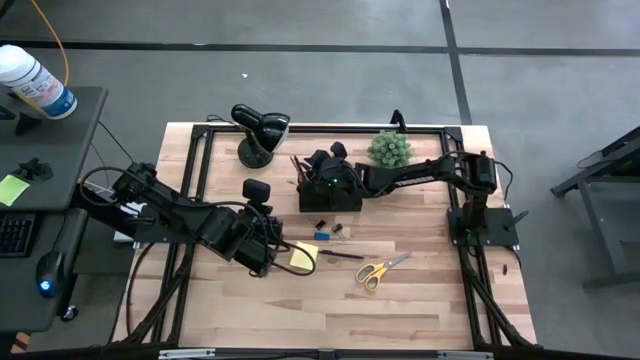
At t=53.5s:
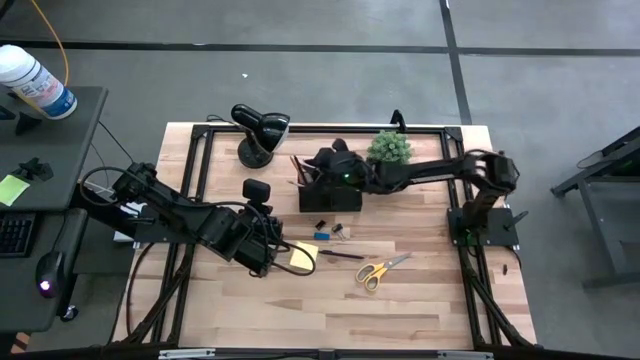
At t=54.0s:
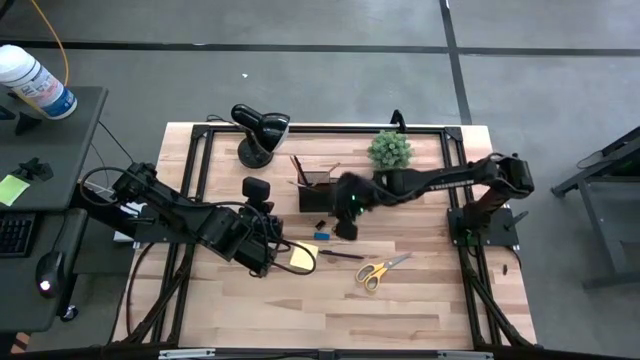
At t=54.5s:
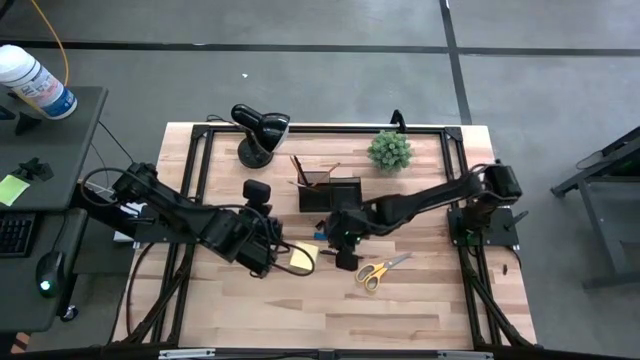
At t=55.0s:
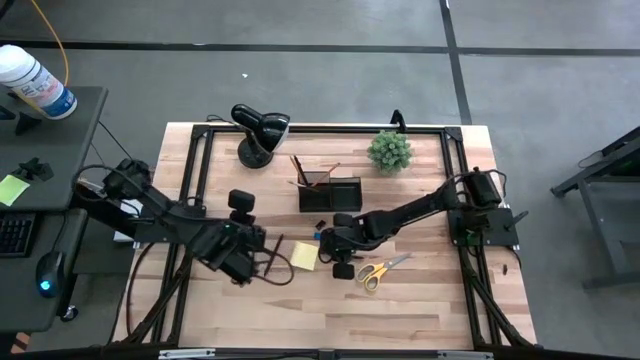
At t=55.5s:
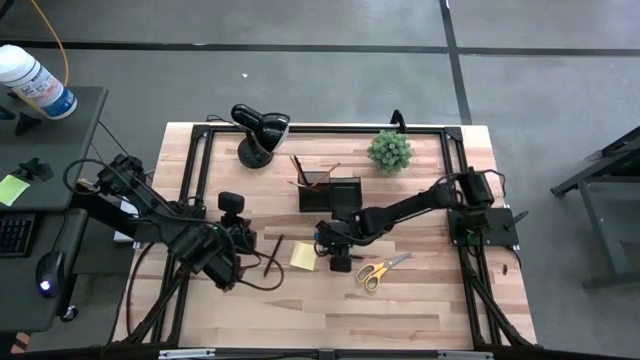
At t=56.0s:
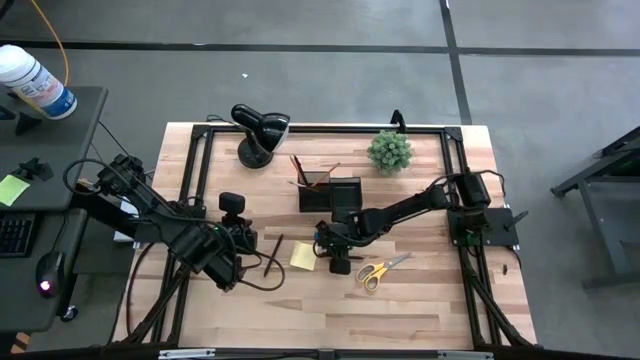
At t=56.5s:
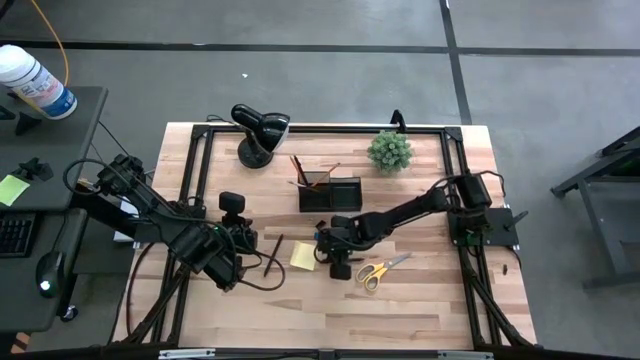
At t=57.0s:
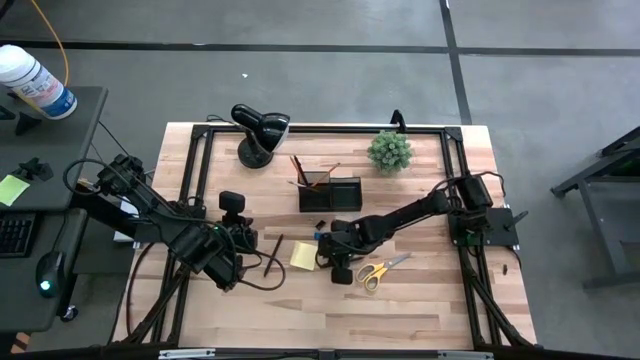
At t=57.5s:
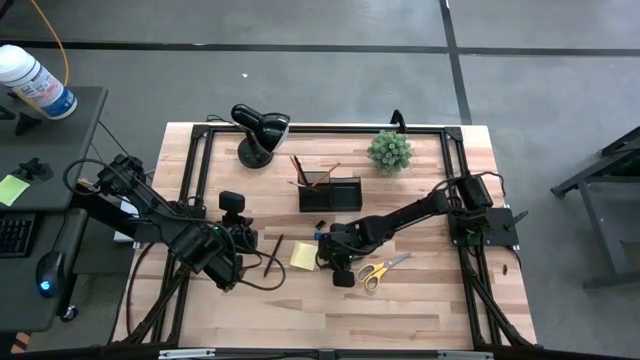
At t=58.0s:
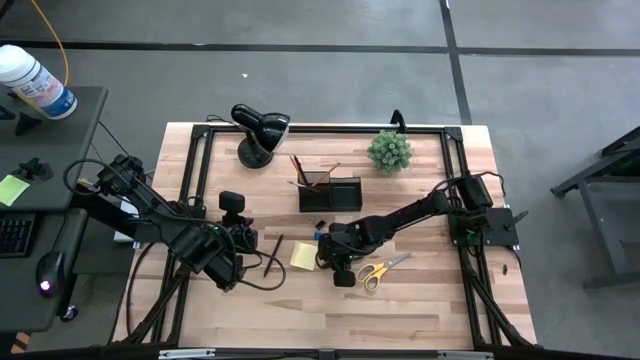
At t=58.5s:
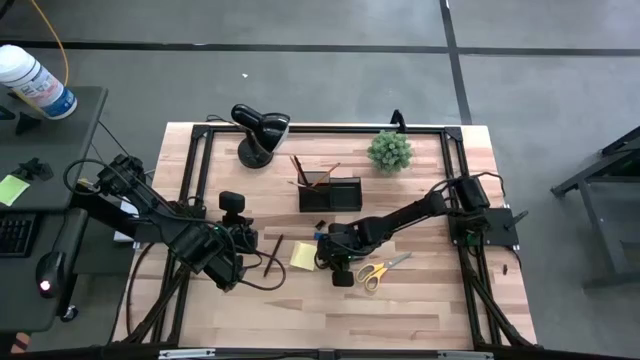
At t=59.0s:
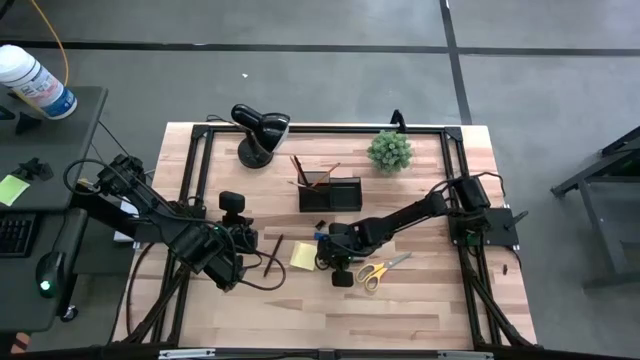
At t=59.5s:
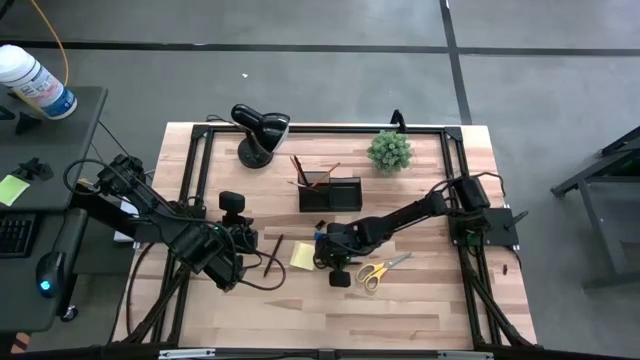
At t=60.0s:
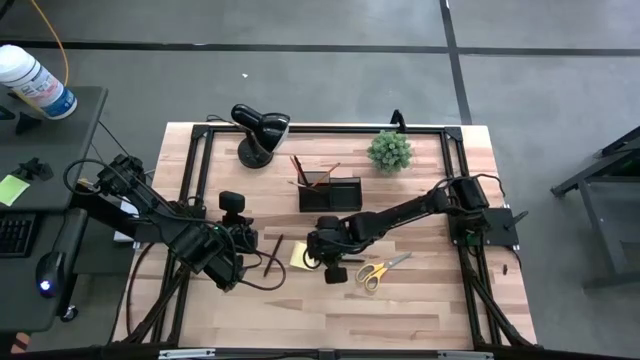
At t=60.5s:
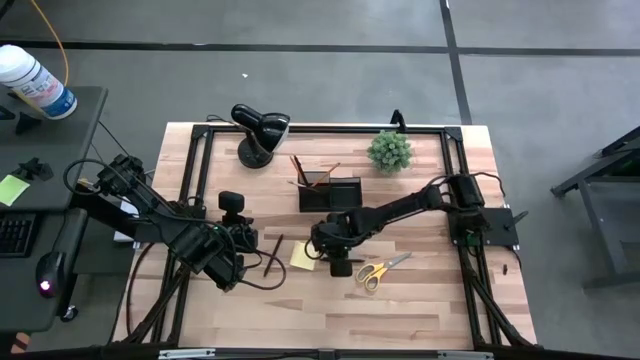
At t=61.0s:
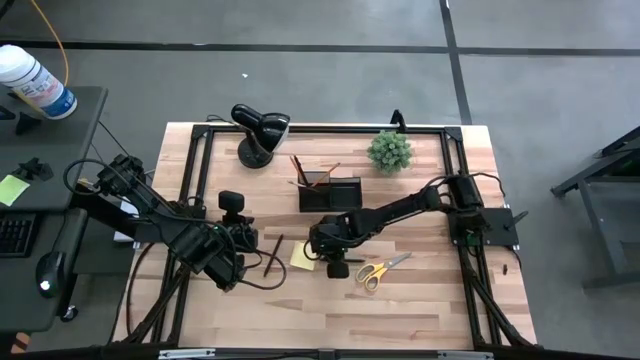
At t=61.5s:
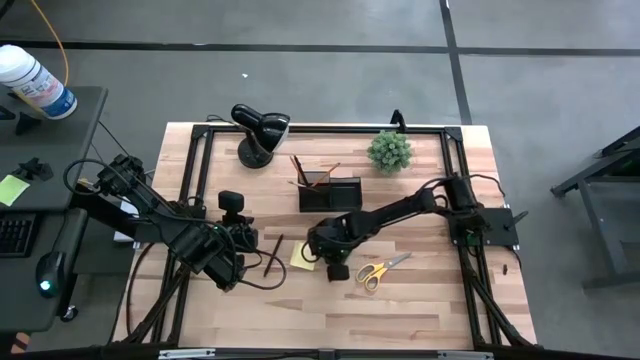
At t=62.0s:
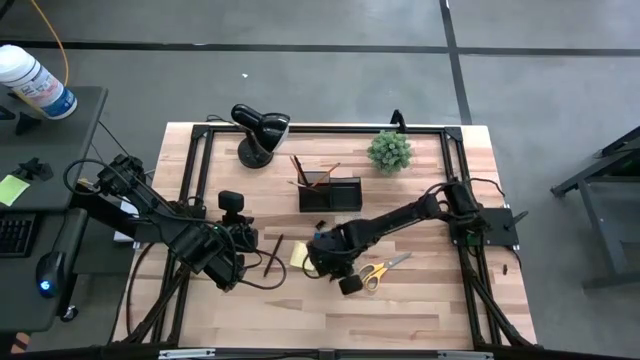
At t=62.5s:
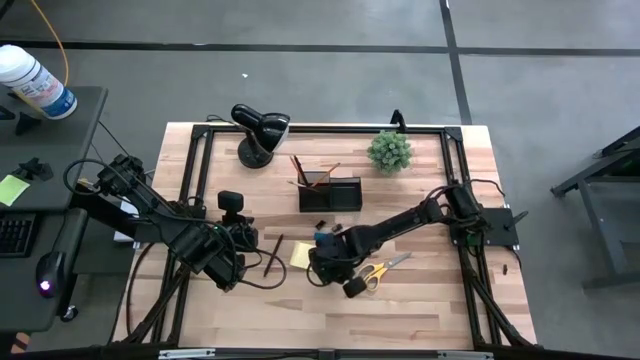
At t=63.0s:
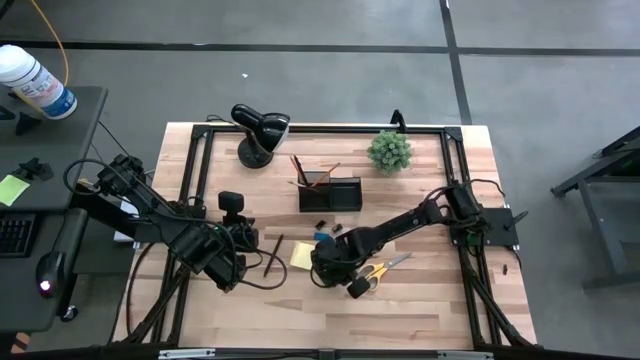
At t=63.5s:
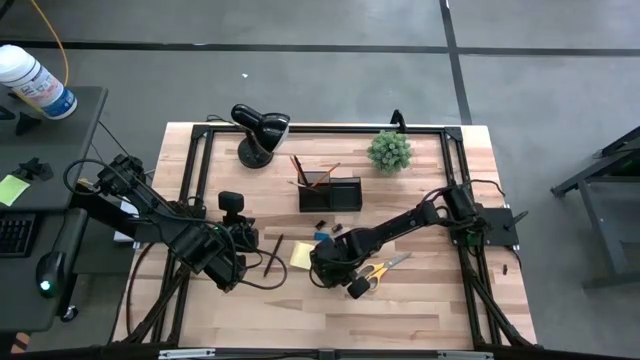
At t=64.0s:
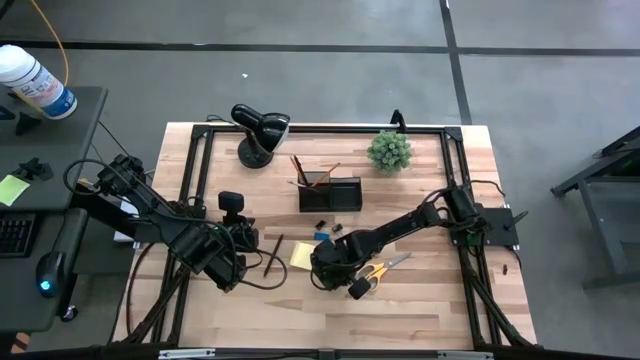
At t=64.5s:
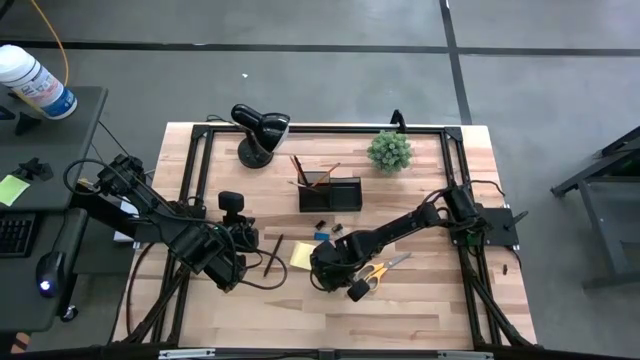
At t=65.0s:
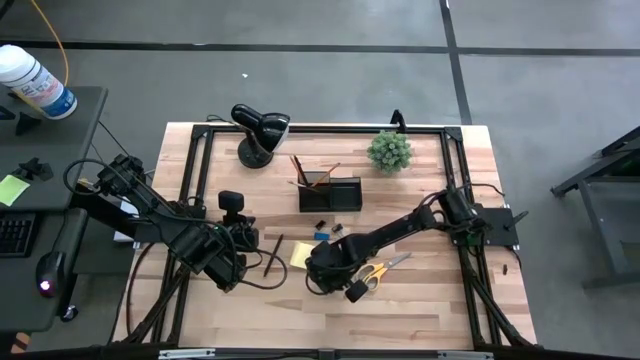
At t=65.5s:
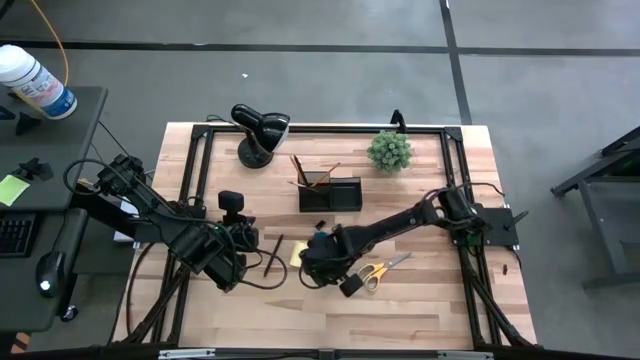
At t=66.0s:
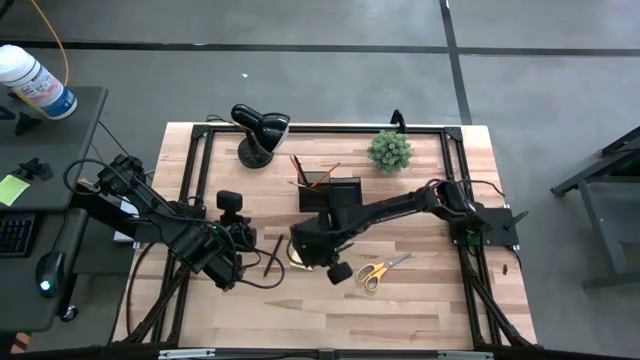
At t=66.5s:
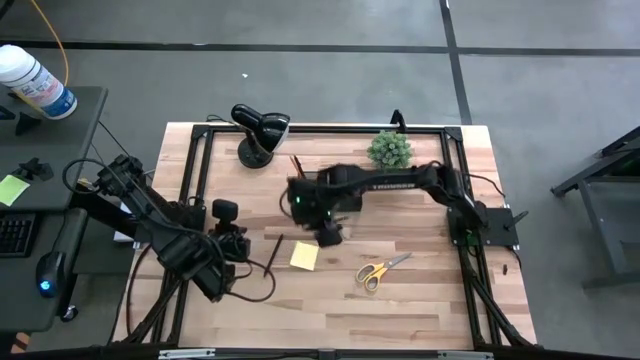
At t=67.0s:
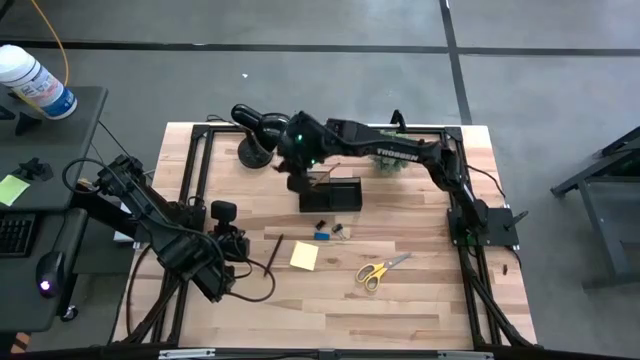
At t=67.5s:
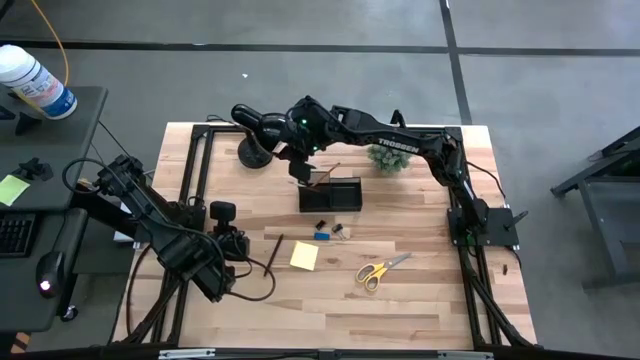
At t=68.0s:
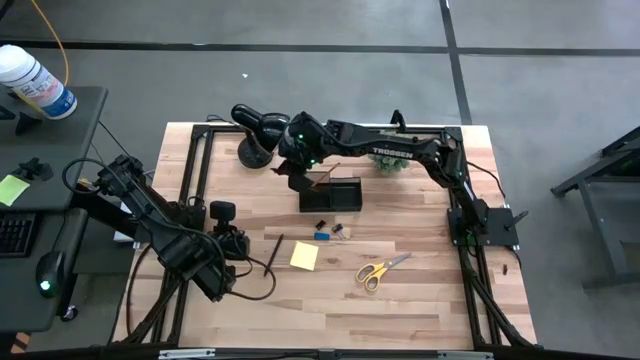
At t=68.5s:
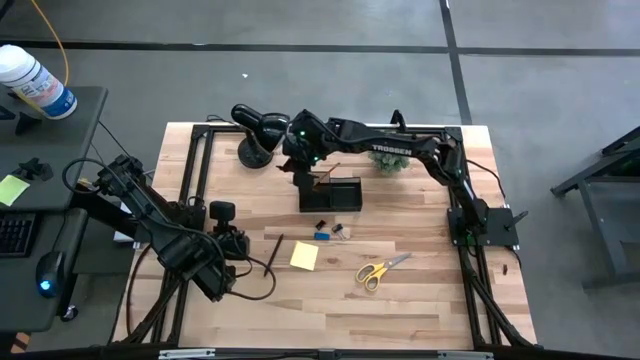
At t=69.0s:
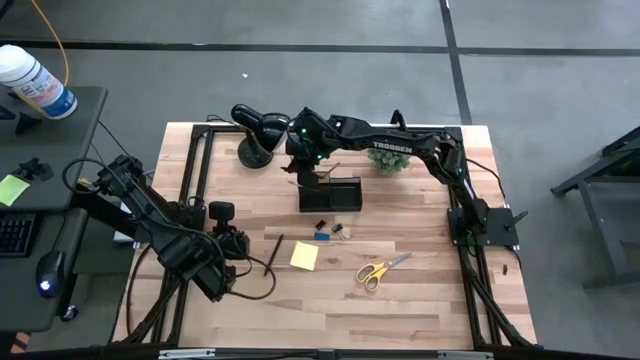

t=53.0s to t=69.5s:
Task: Pick and place office supplies into organizer
Put the right black pen into the black desk organizer

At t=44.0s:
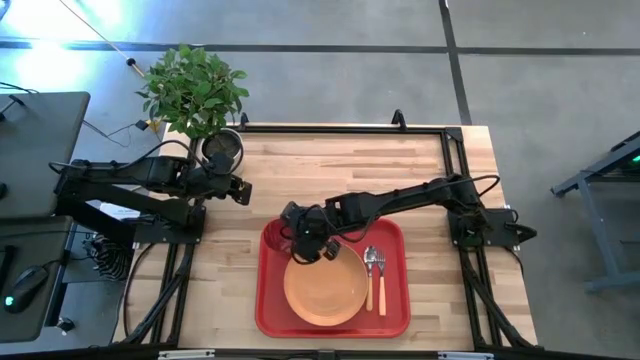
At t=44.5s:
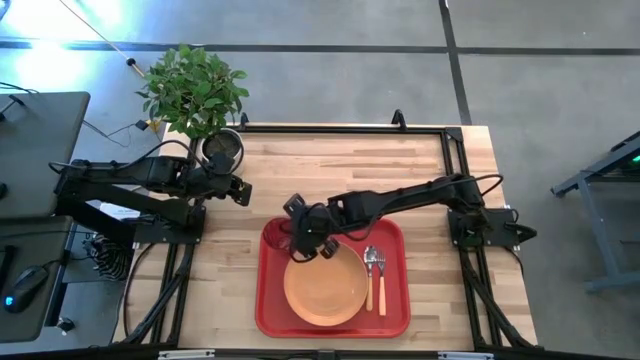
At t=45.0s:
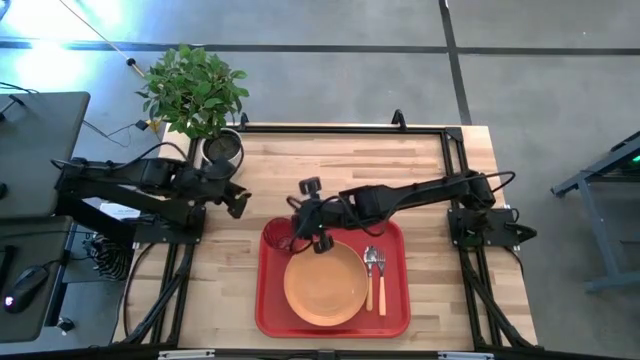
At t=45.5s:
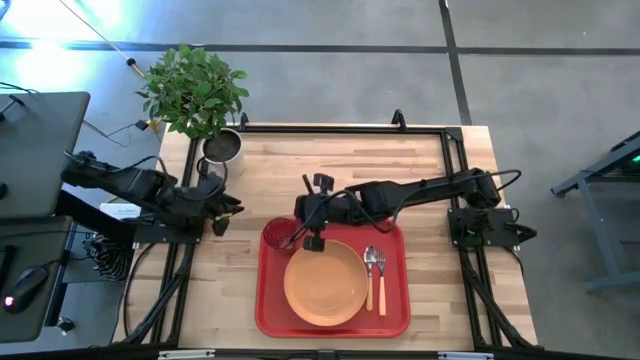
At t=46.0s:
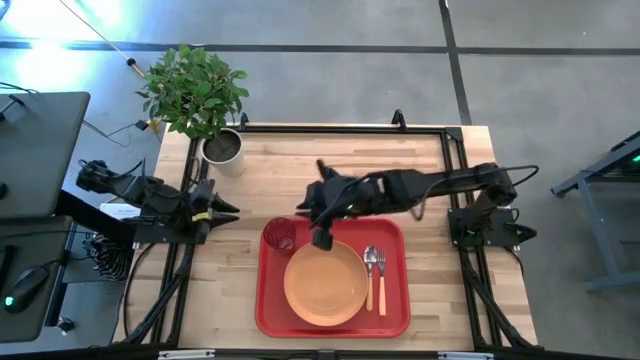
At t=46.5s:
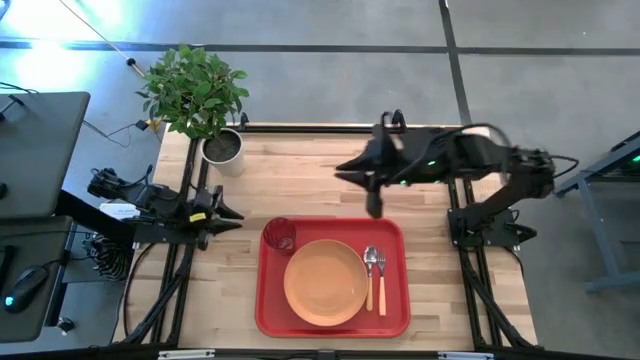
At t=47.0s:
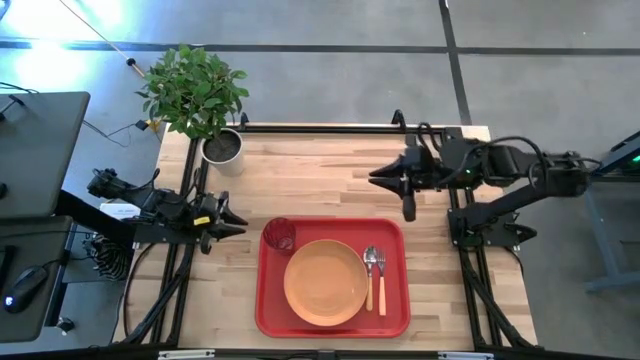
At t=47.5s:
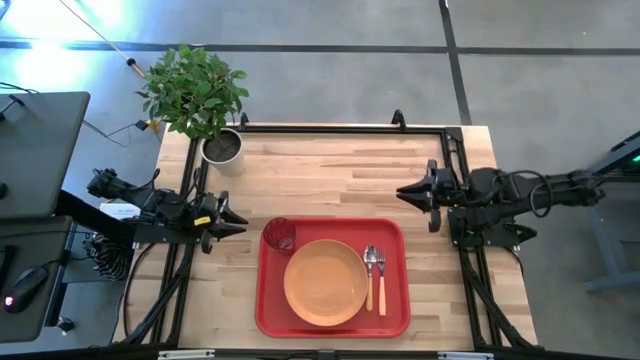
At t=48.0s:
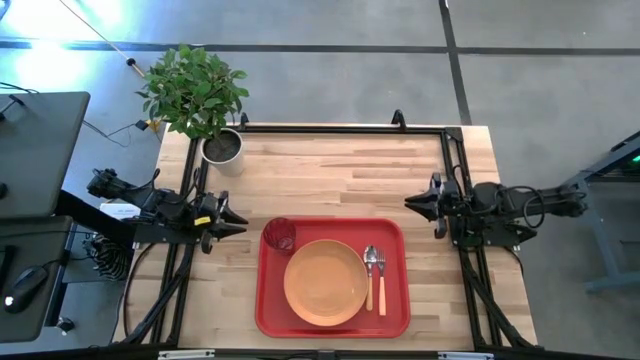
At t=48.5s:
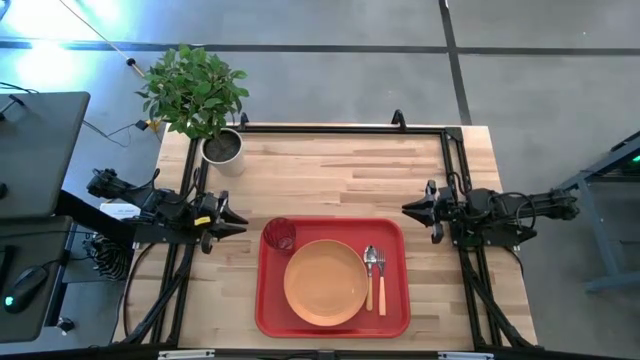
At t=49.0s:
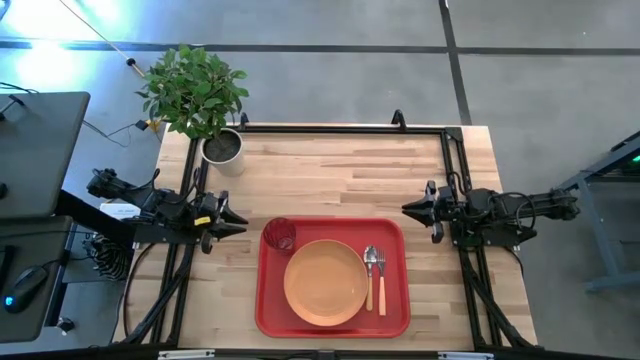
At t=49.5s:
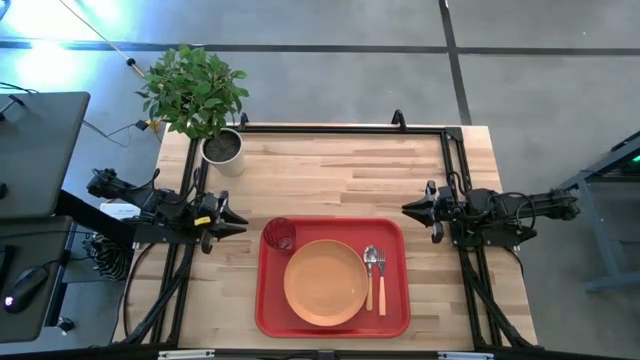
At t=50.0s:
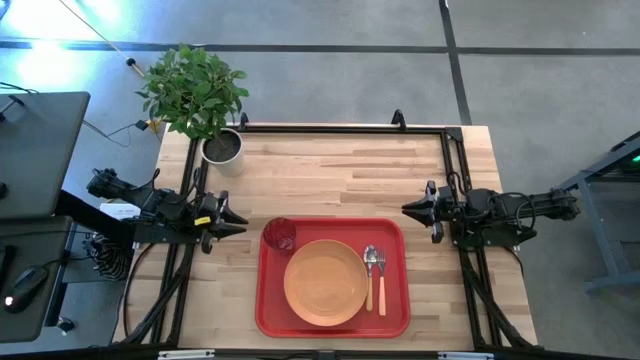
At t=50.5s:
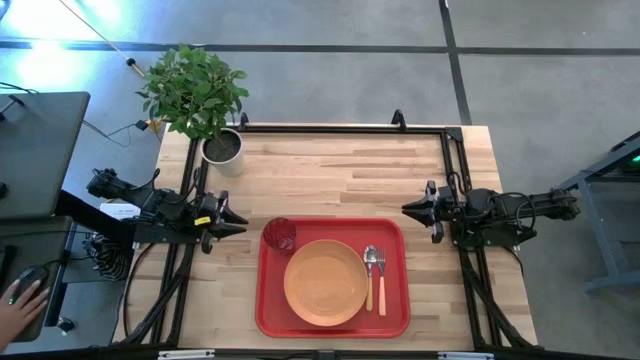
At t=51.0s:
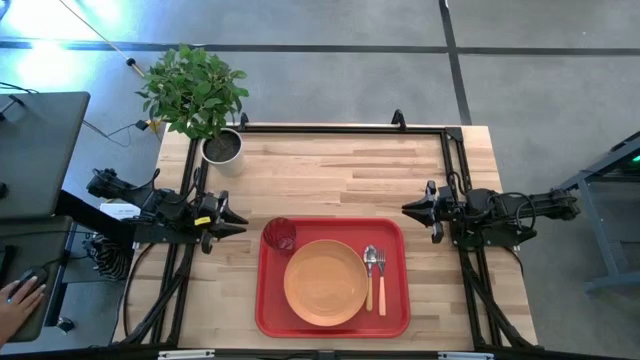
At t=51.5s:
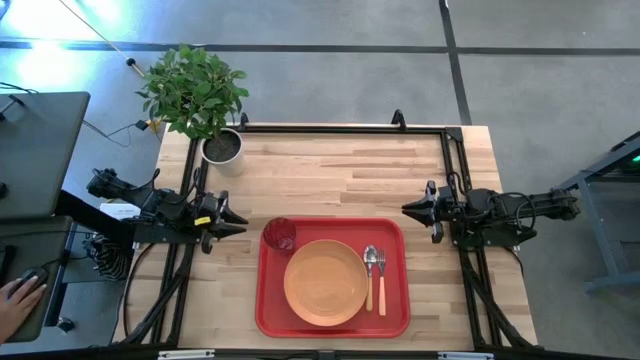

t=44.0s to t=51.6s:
Task: Pick and place plate/cup/fork/spoon on tray
Return to Home Position
